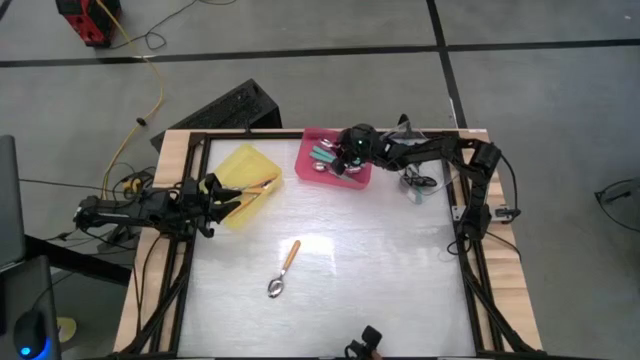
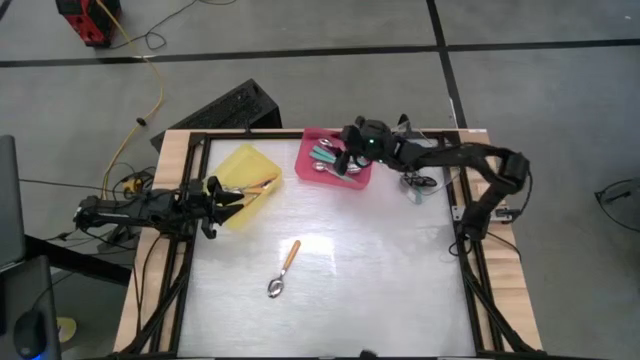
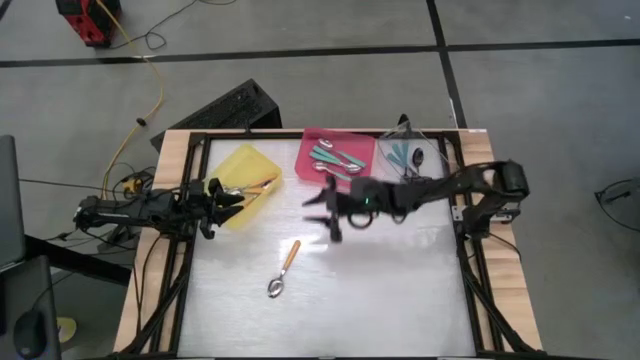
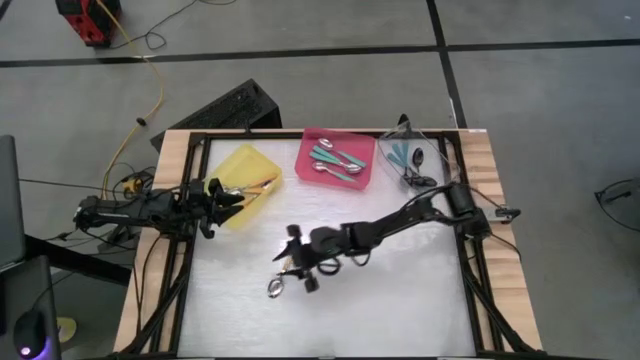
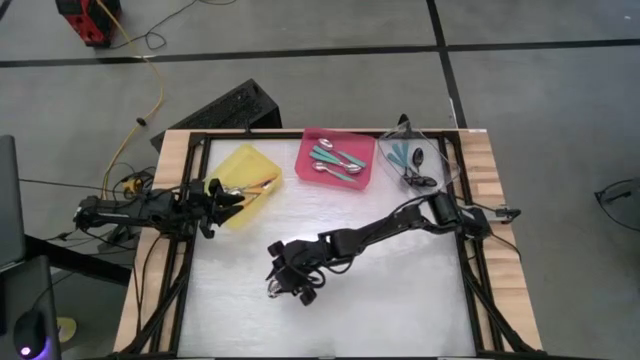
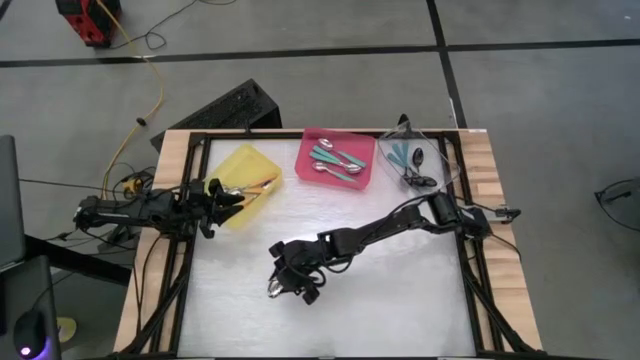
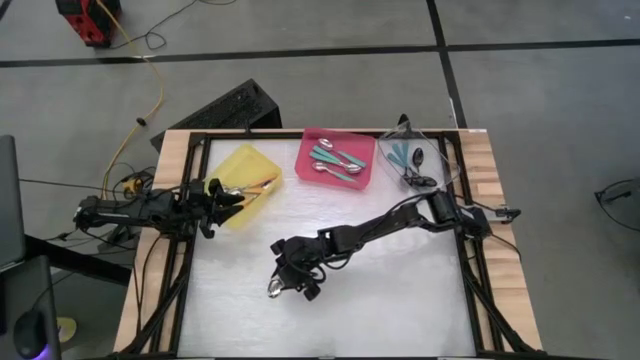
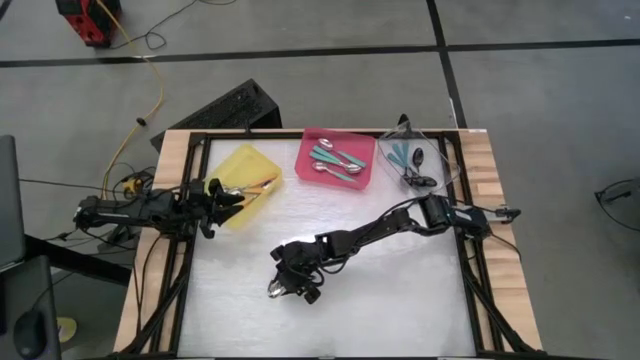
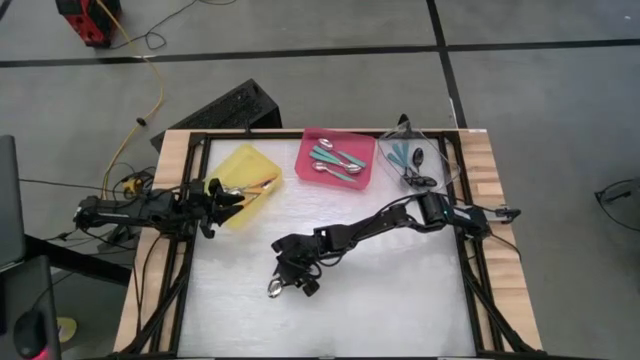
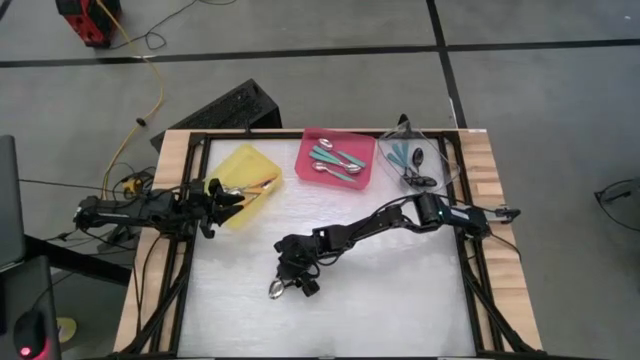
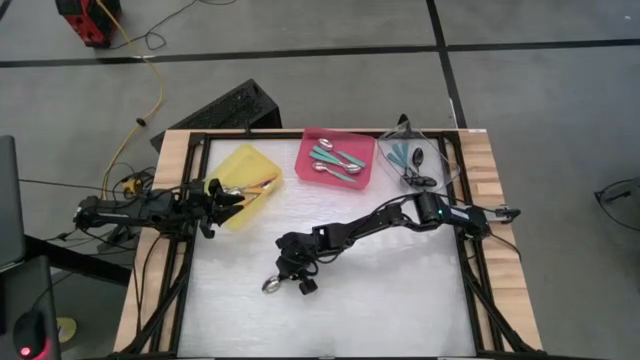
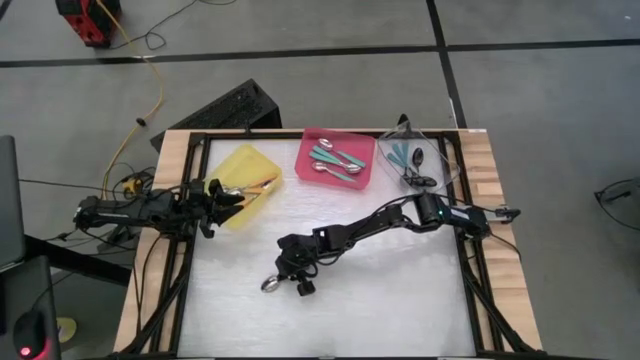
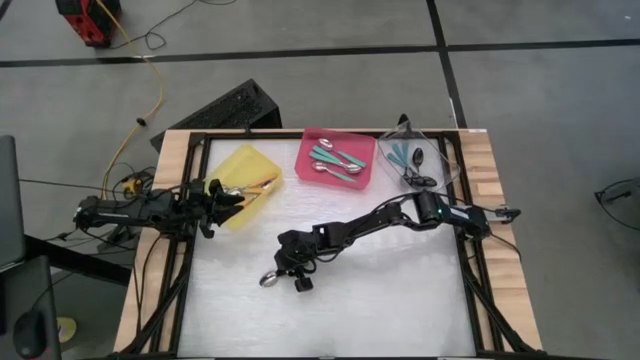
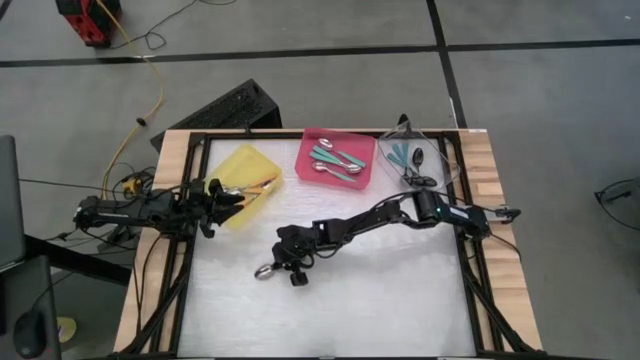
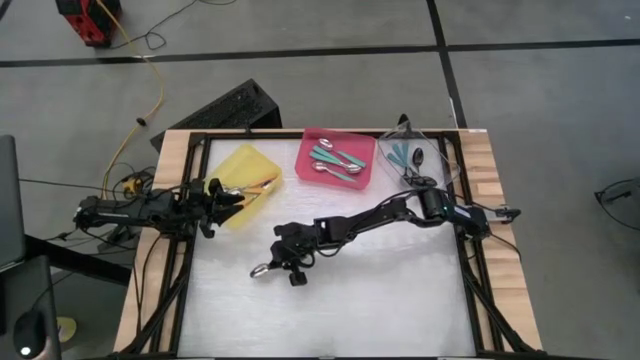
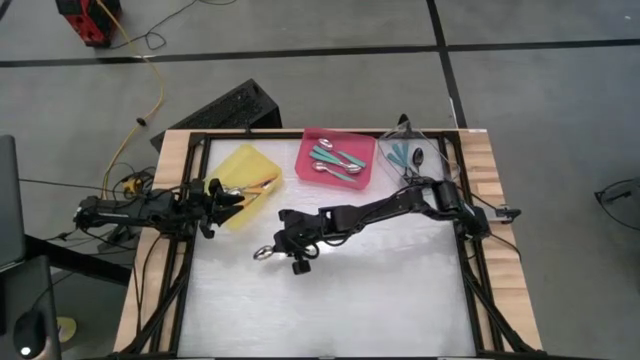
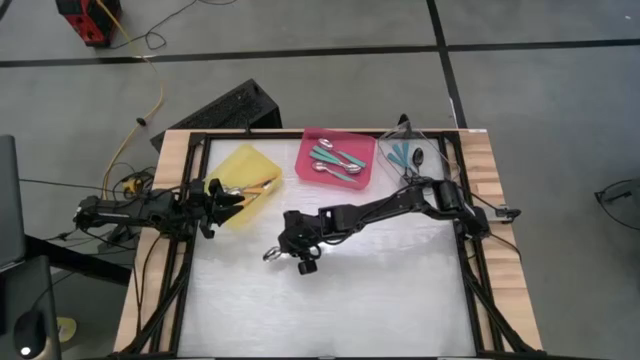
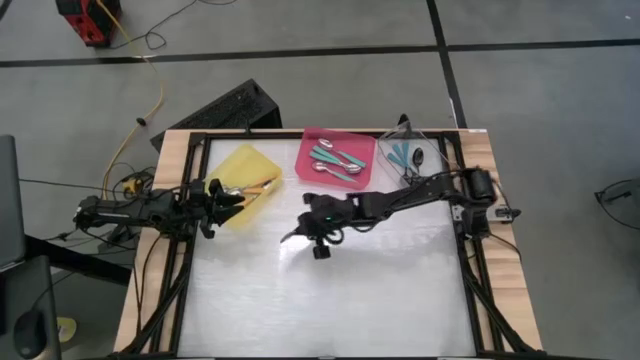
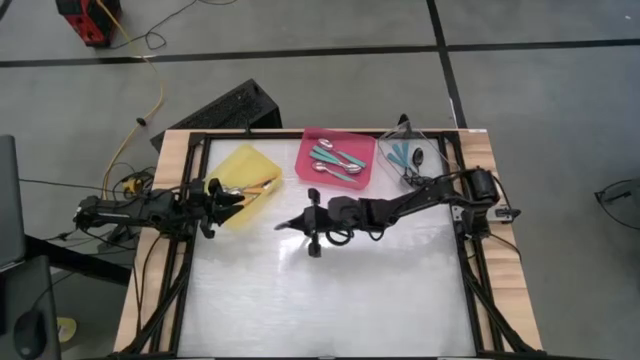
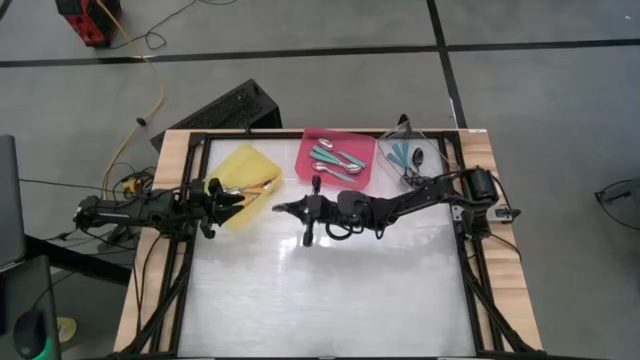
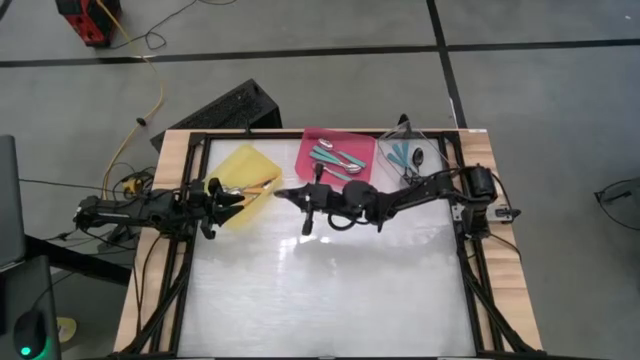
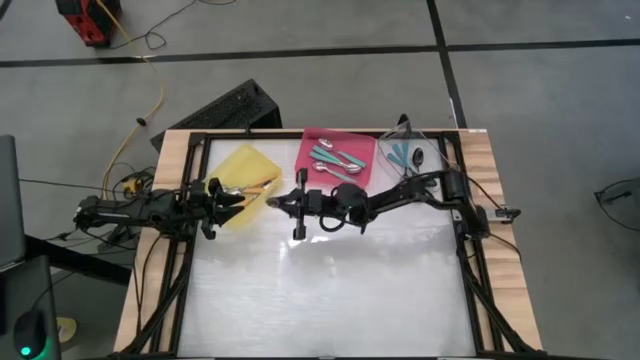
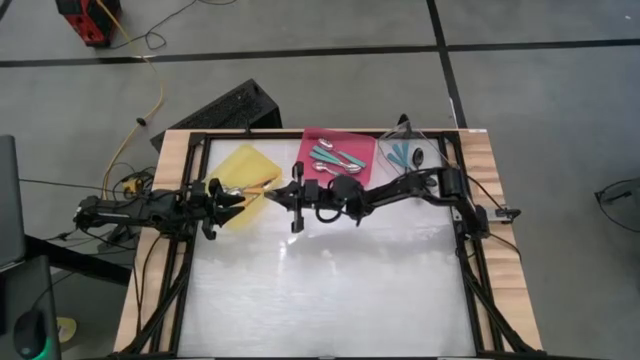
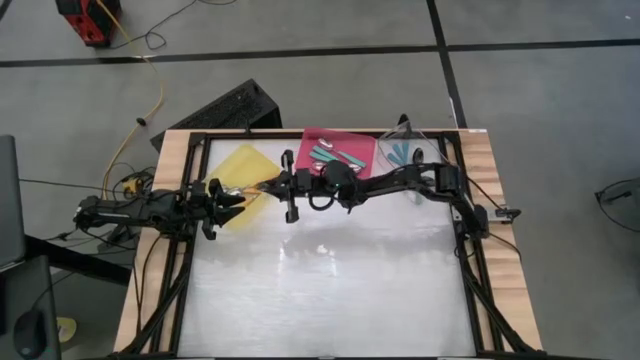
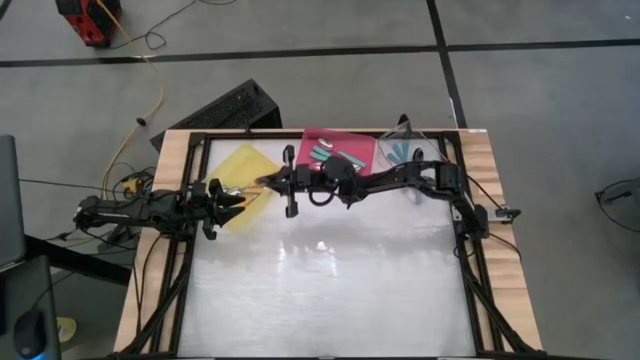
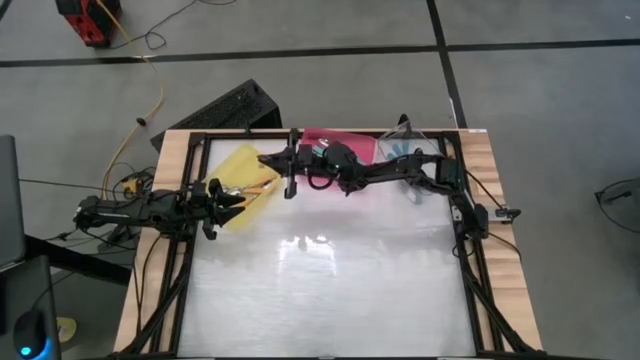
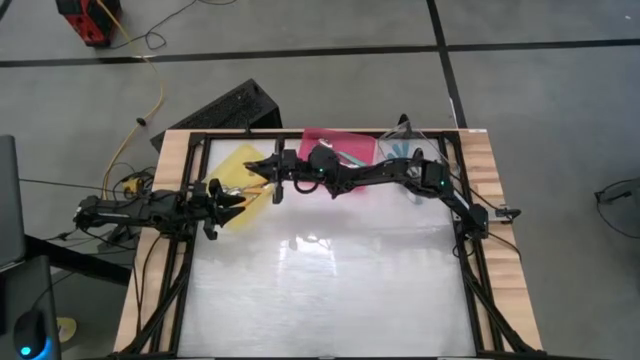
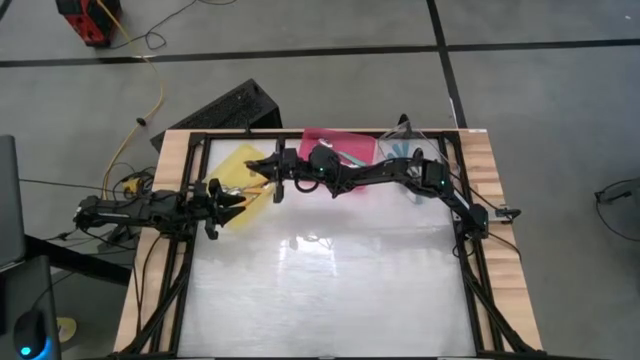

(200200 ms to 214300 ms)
Task: Sort silverware by color (type)
Put the yellow spoon into the yellow bin

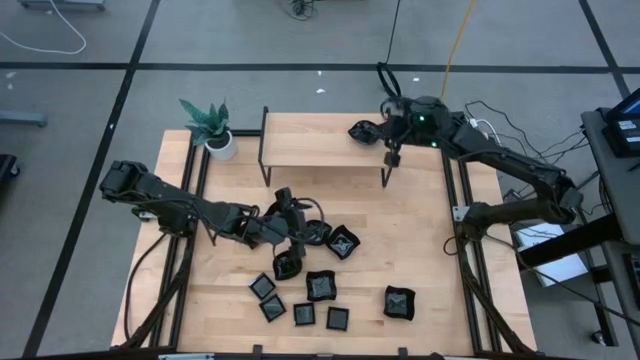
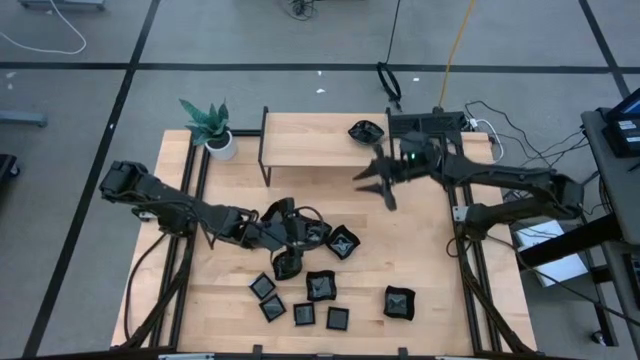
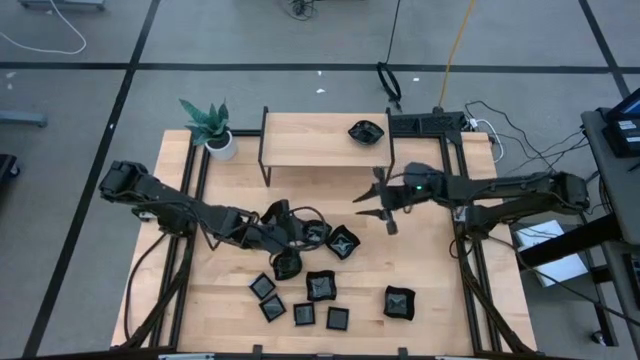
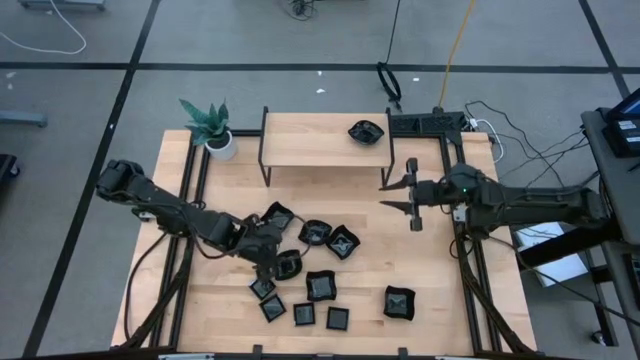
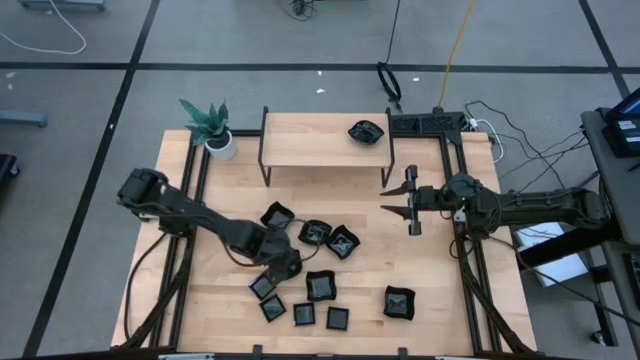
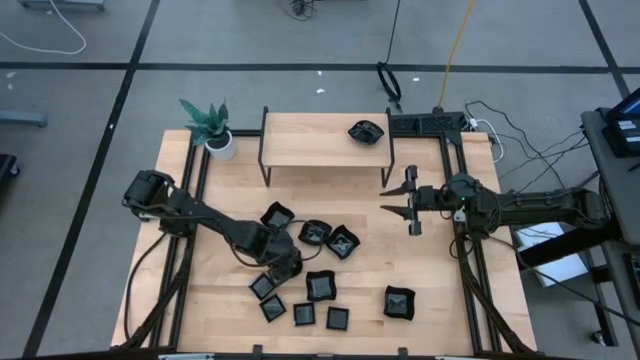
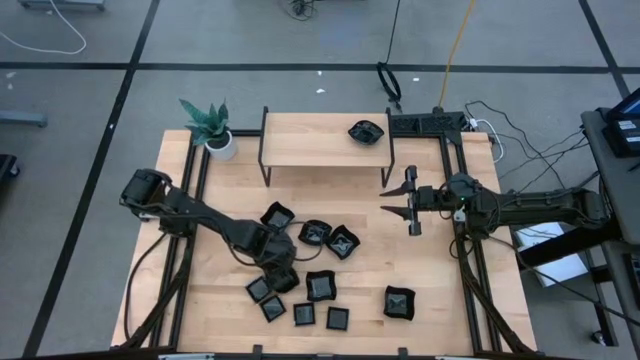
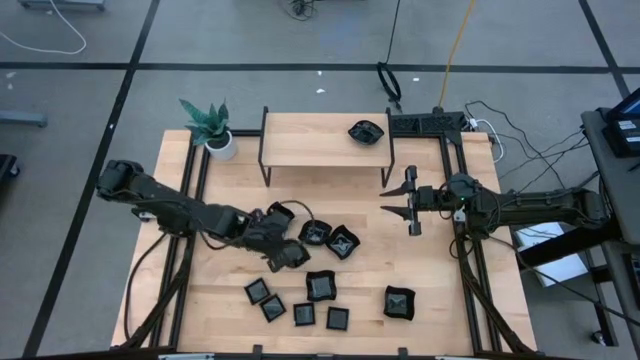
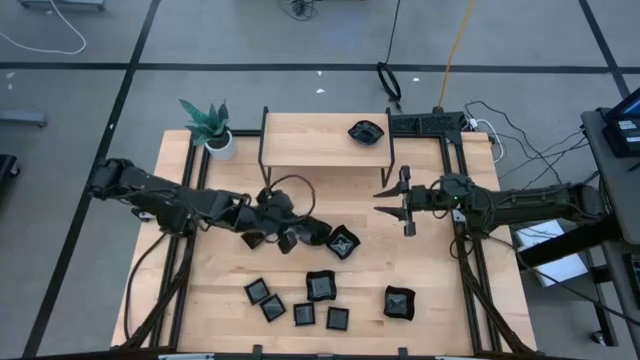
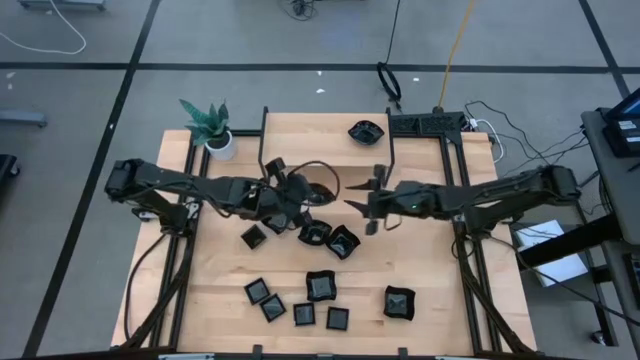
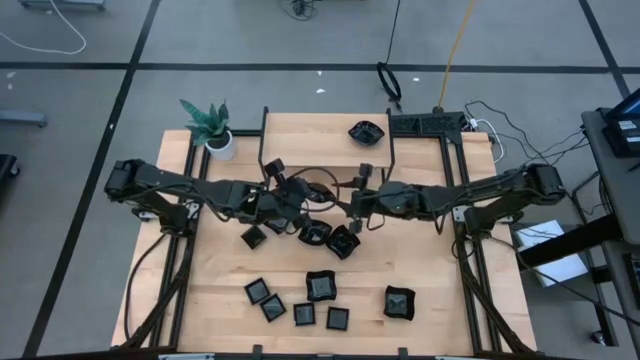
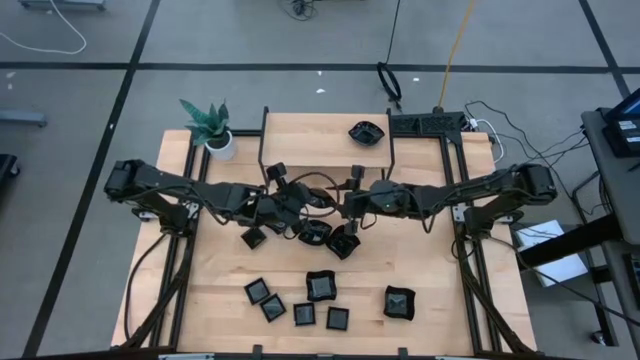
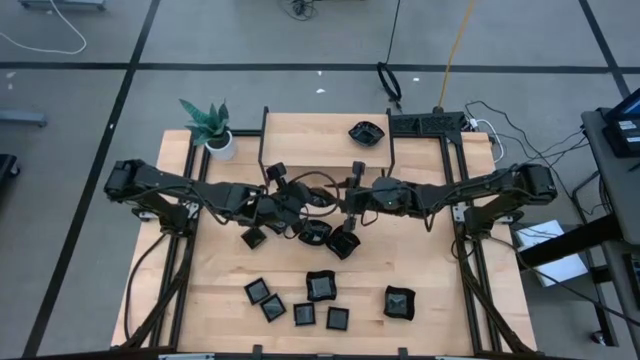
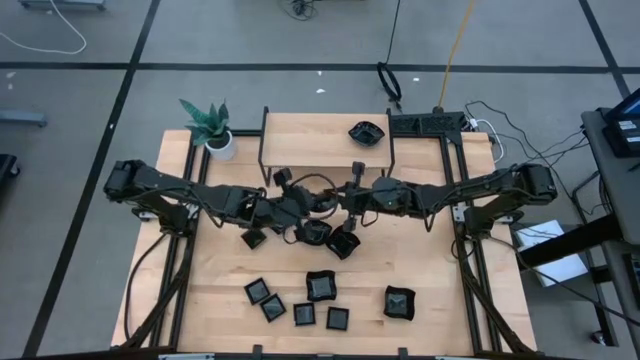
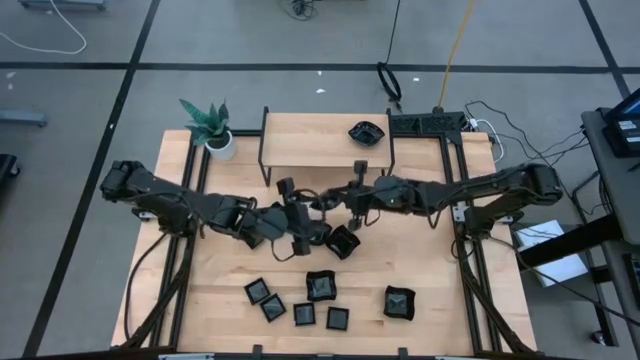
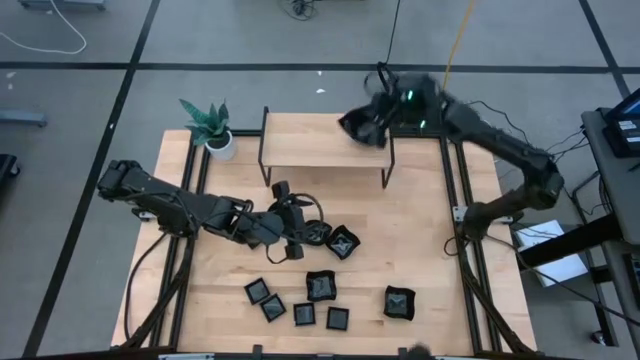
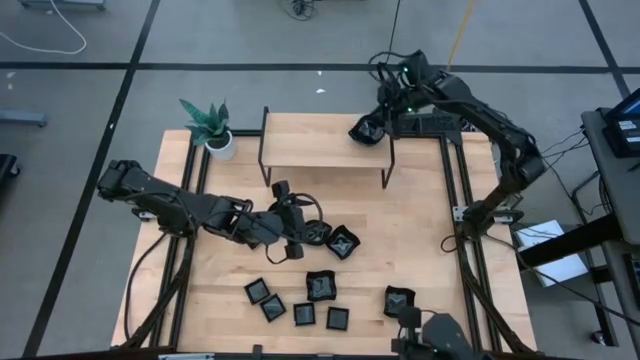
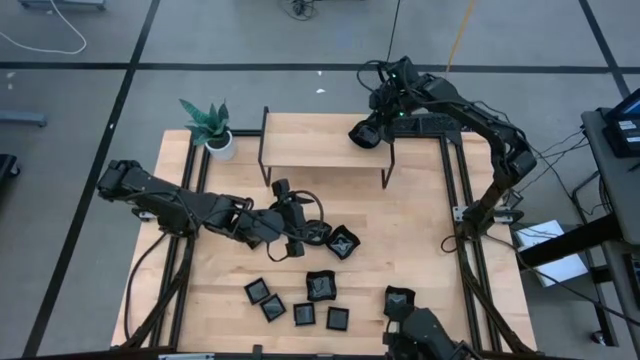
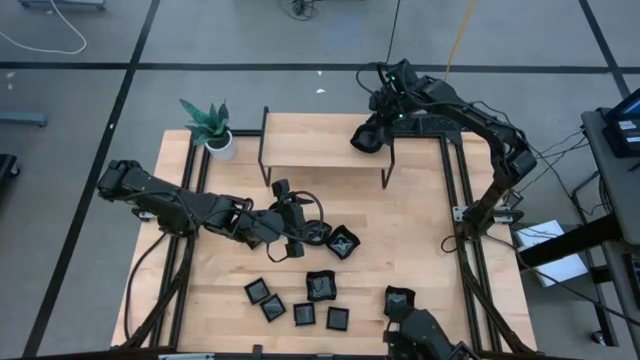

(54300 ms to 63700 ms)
Task: Pick & Place Mini shaped plates
Stack the black leaf-shaped plate on top of the other black leaf-shaped plates on the shelf
